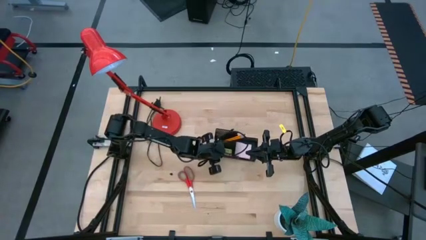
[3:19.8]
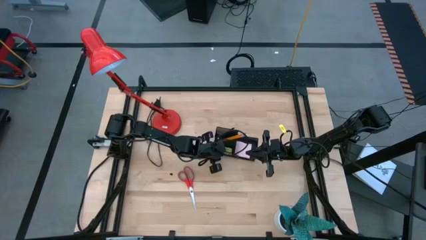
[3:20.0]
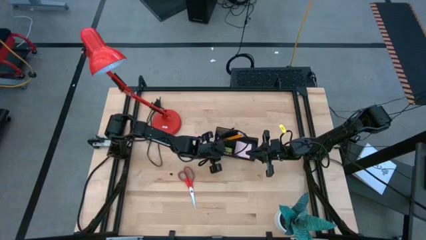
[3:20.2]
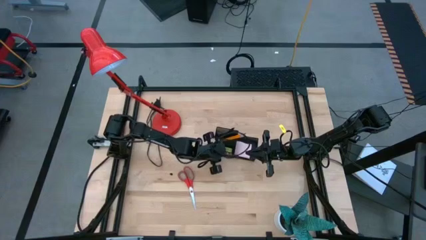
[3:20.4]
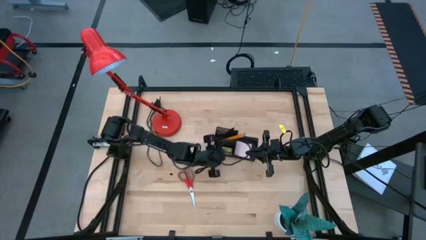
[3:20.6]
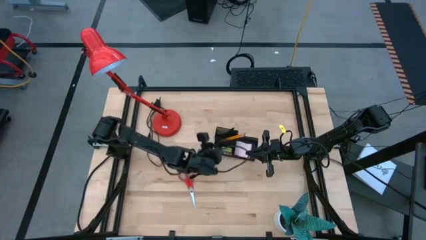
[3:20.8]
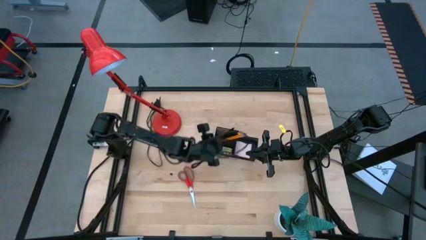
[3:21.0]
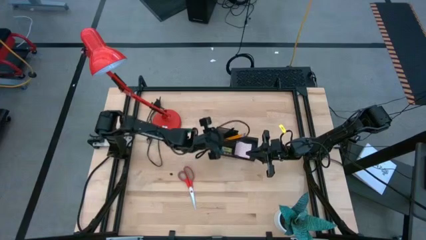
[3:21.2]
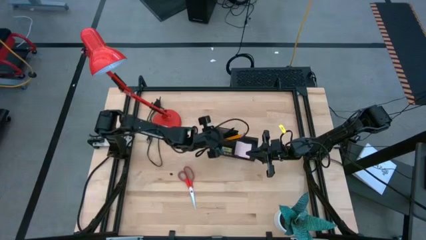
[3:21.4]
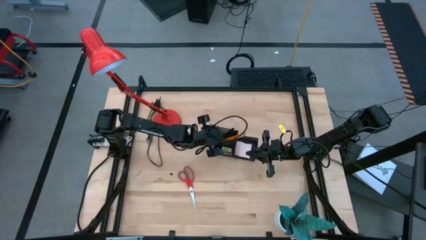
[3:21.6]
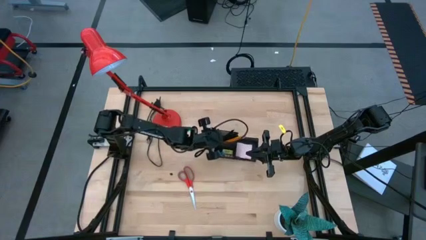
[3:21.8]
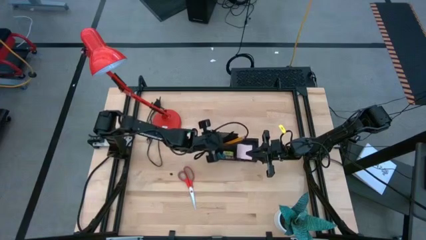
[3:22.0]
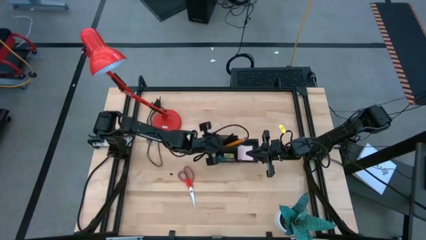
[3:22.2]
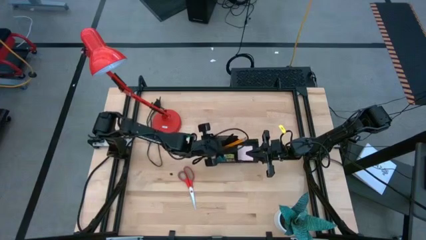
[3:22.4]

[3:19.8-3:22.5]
Task: Pick and place office supplies into organizer
Adjust the black desk organizer

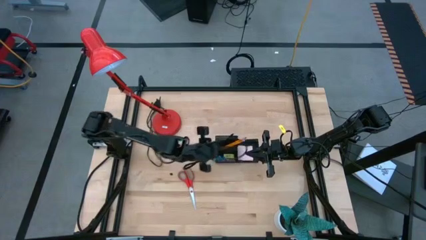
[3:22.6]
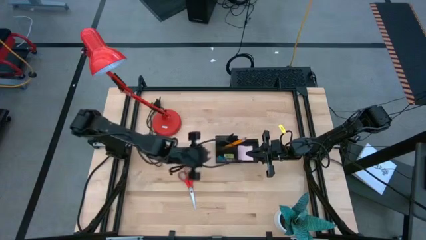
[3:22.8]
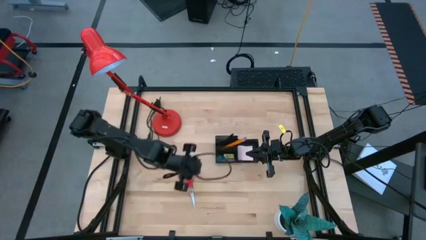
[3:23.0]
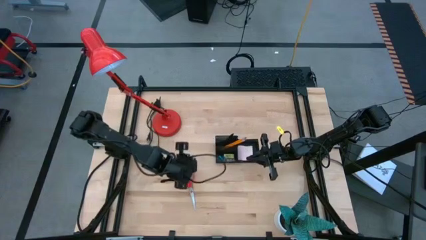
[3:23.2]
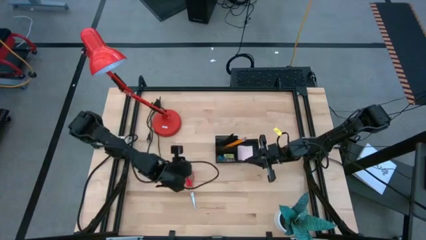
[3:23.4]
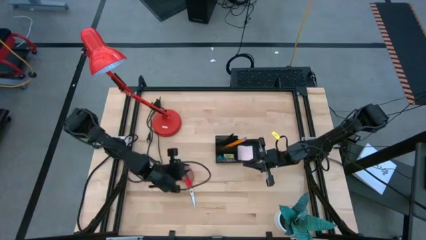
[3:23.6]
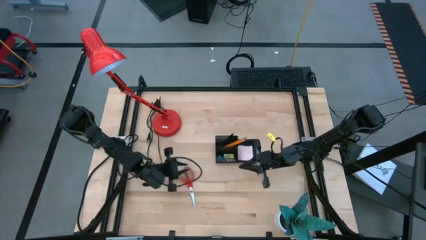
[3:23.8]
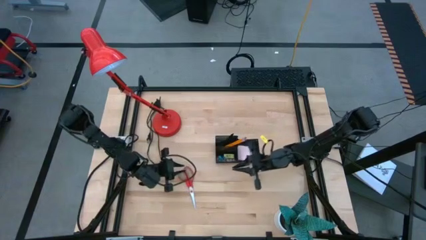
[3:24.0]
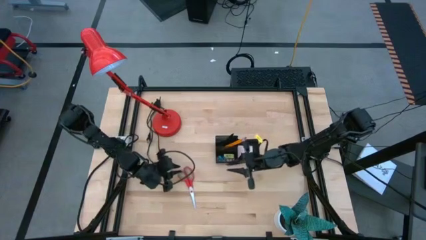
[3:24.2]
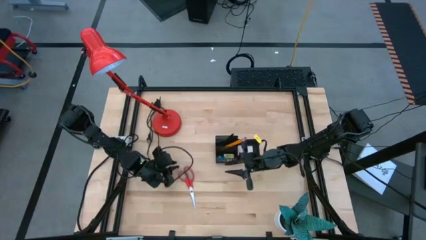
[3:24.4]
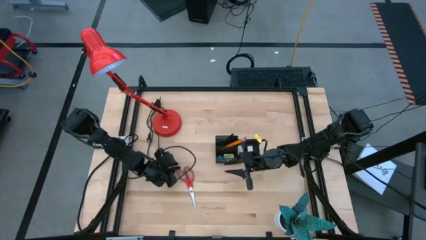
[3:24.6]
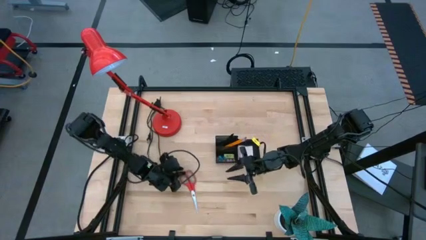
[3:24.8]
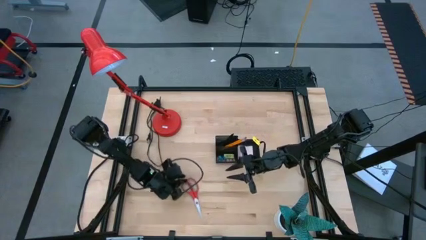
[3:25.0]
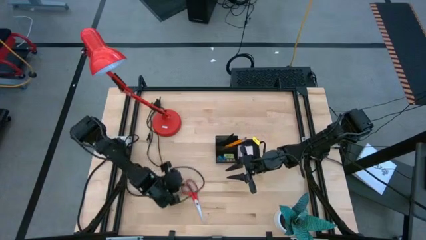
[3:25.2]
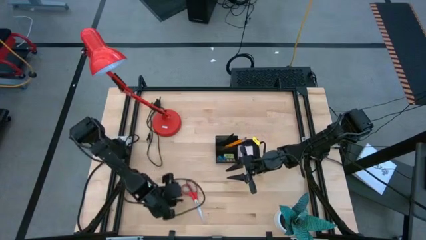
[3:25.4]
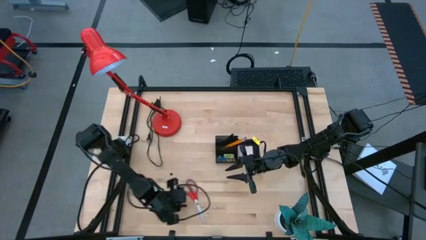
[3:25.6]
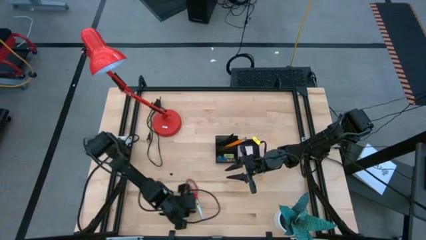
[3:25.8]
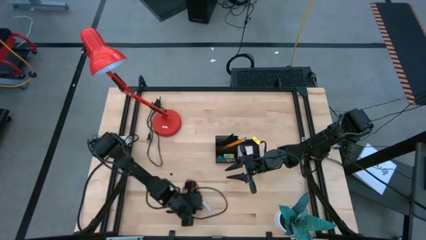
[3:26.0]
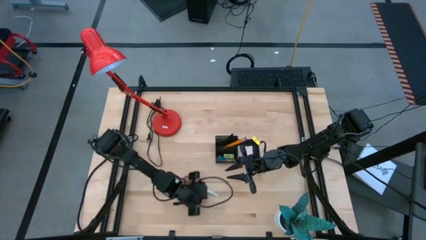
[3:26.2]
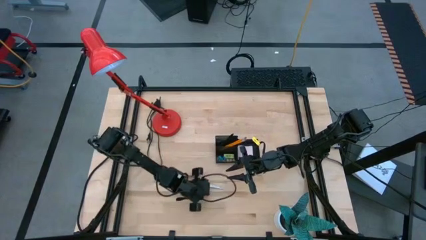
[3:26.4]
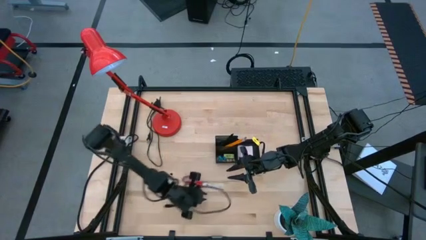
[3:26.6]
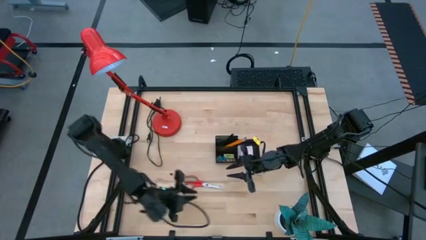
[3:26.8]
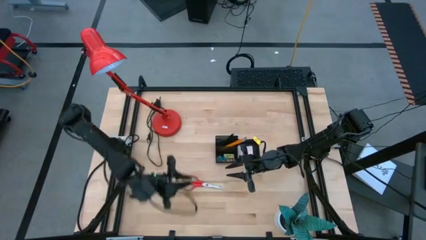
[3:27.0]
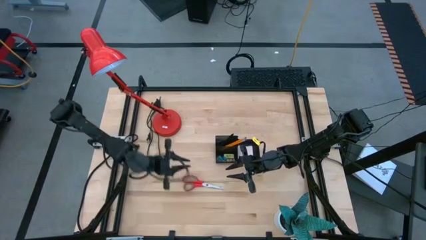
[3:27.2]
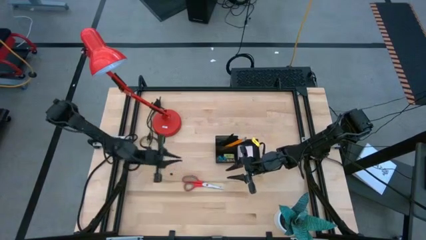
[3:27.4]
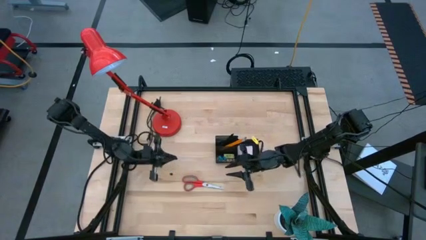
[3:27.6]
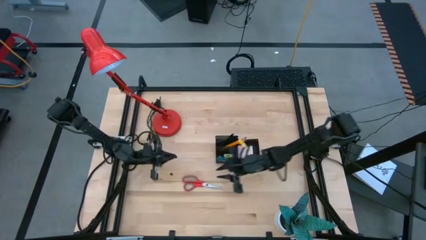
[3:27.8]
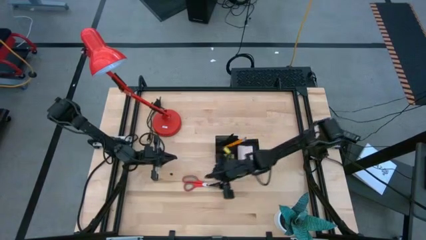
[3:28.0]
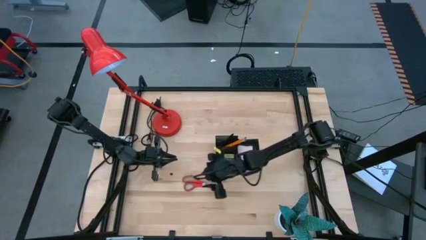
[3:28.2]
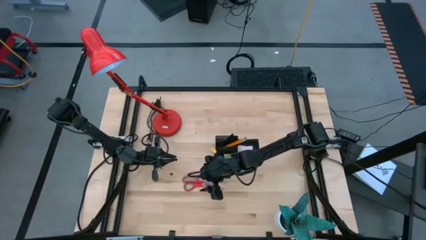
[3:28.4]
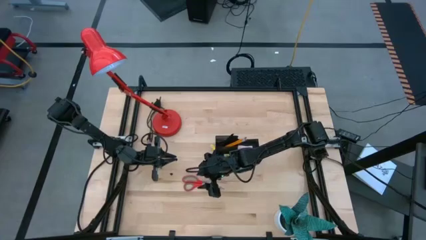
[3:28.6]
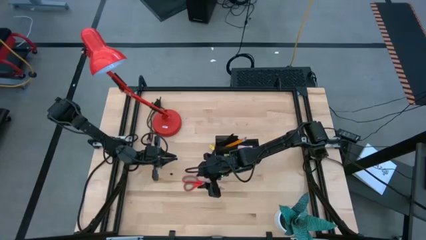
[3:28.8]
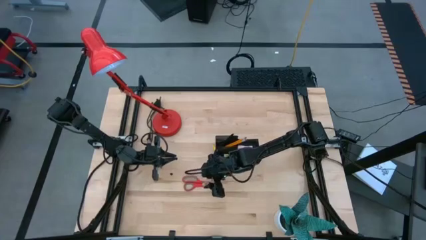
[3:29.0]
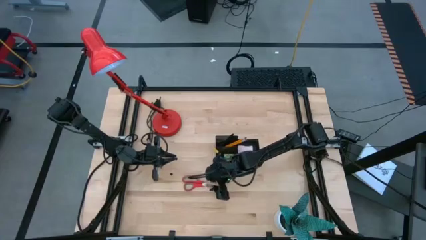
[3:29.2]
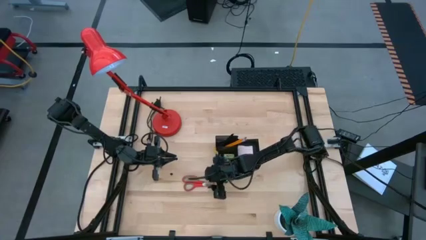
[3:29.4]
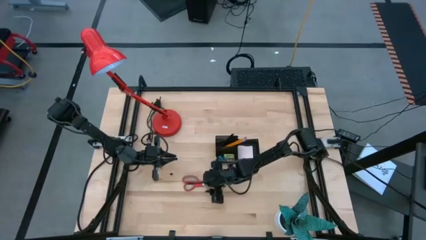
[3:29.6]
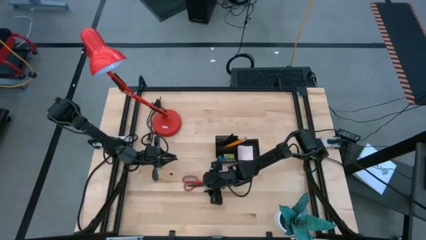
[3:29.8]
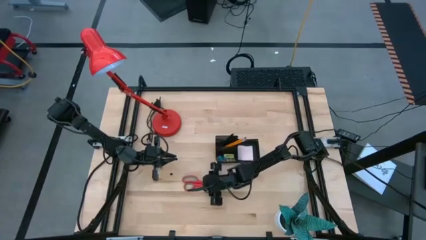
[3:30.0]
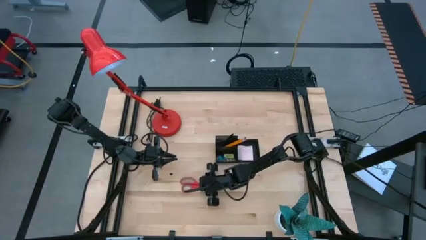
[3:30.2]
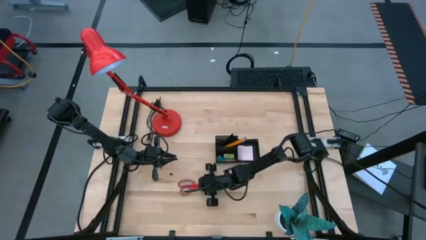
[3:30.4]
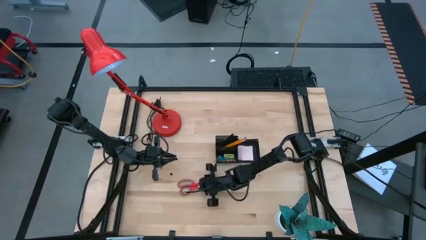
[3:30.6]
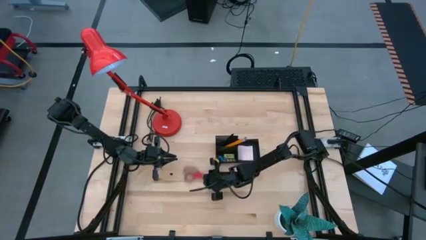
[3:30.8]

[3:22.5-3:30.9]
Put the red scissors into the black desk organizer

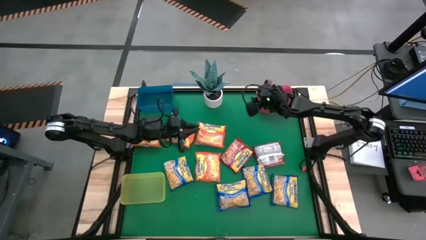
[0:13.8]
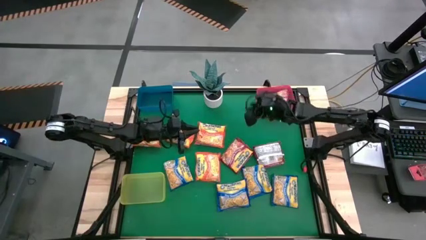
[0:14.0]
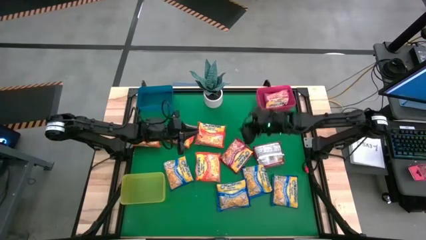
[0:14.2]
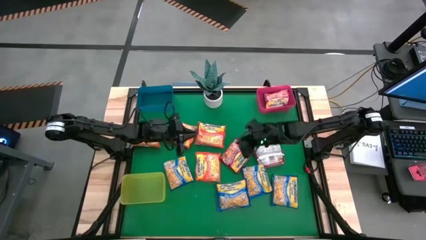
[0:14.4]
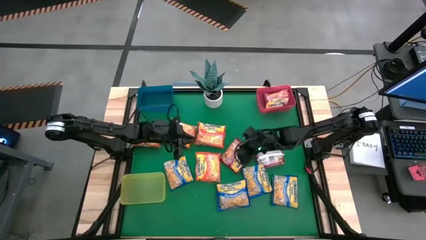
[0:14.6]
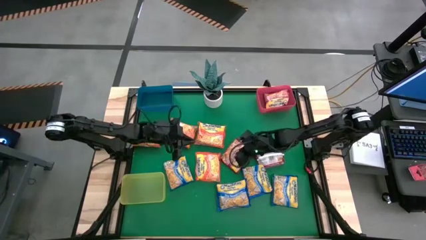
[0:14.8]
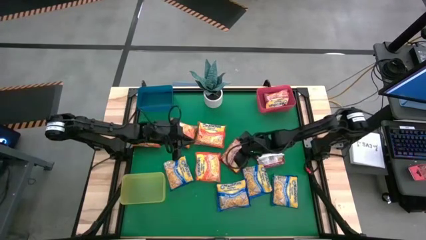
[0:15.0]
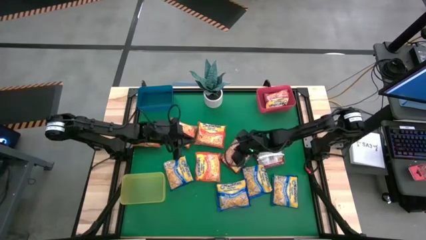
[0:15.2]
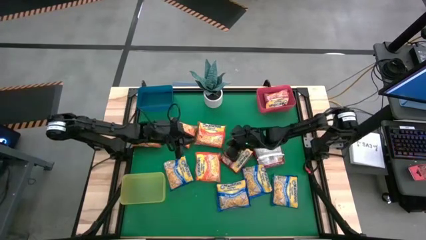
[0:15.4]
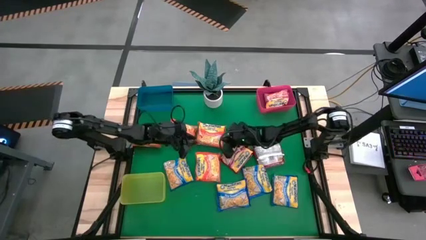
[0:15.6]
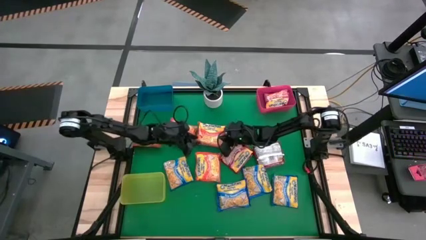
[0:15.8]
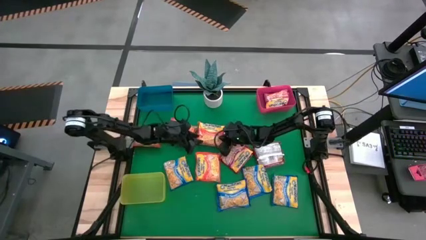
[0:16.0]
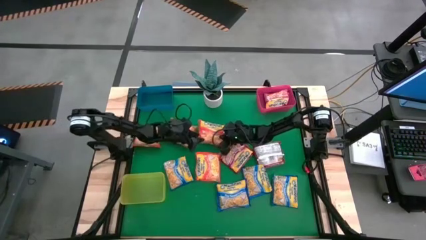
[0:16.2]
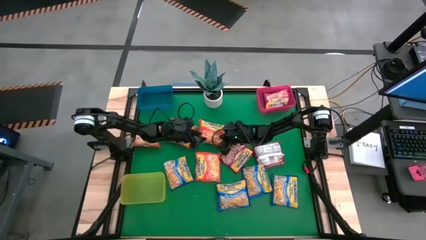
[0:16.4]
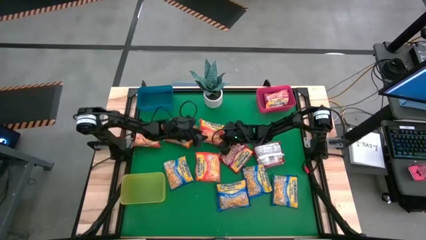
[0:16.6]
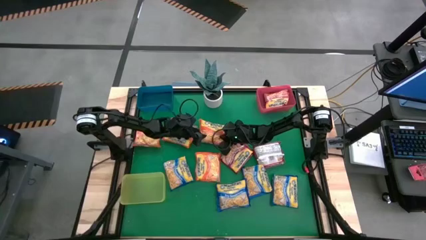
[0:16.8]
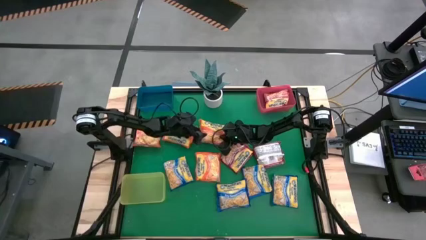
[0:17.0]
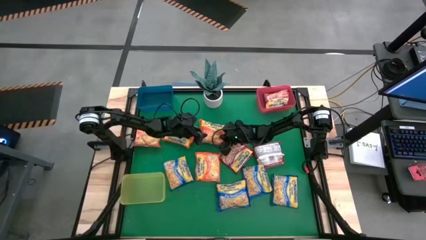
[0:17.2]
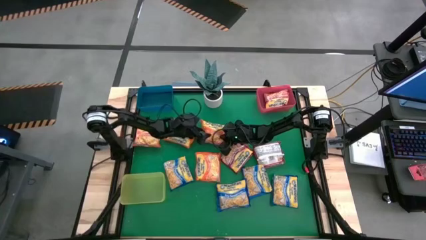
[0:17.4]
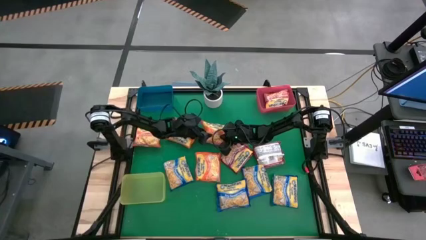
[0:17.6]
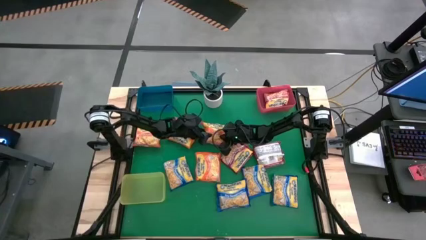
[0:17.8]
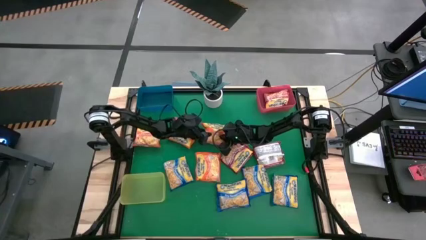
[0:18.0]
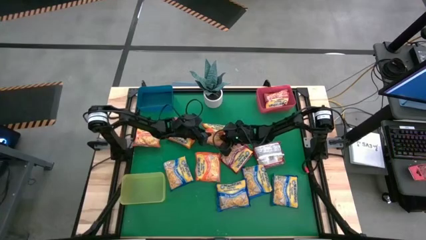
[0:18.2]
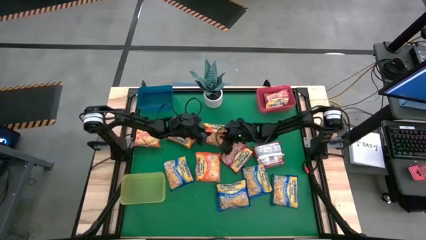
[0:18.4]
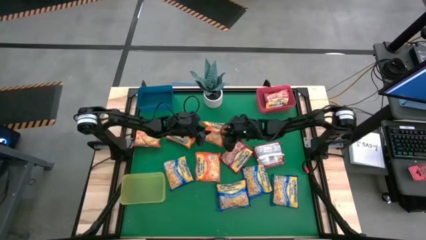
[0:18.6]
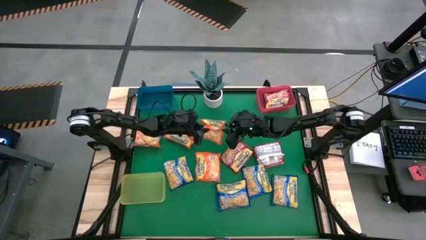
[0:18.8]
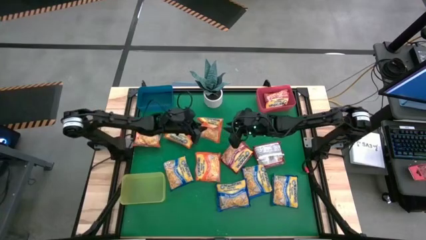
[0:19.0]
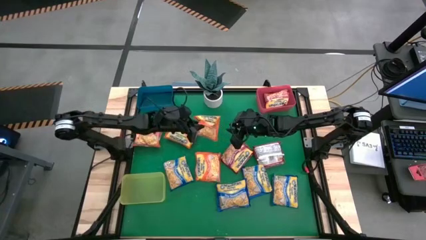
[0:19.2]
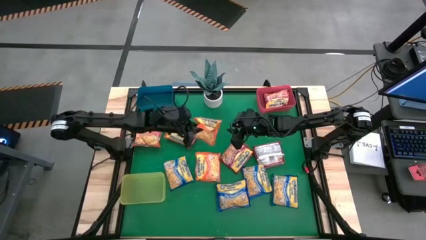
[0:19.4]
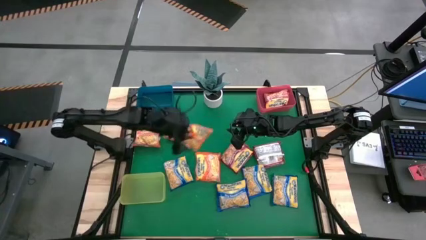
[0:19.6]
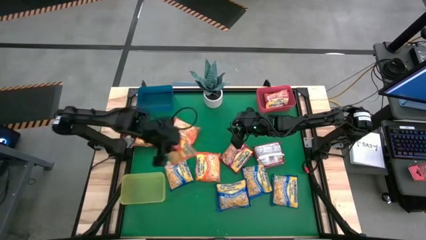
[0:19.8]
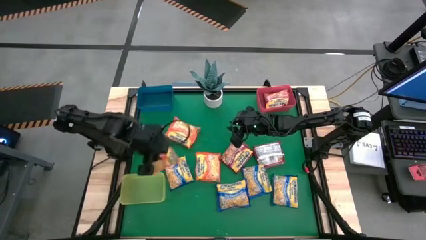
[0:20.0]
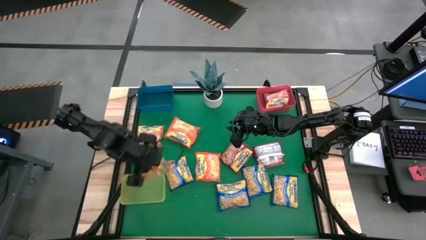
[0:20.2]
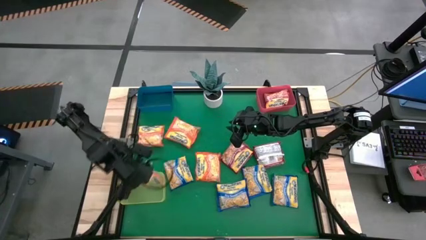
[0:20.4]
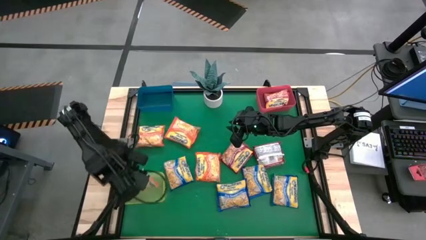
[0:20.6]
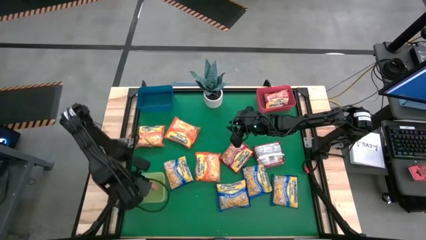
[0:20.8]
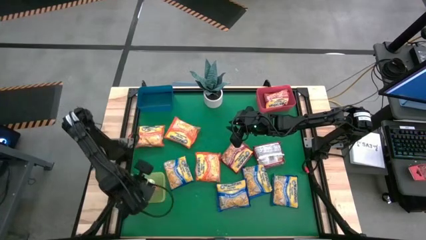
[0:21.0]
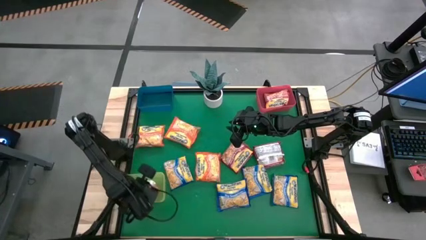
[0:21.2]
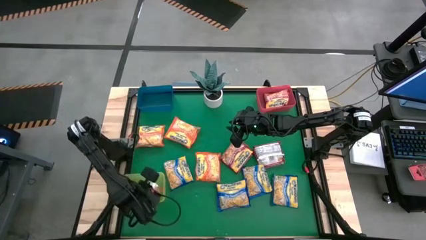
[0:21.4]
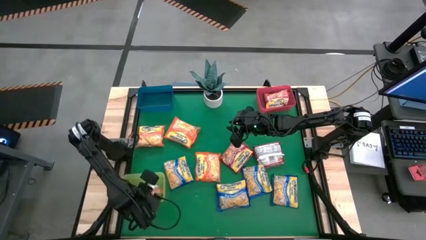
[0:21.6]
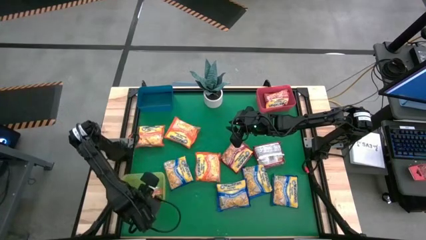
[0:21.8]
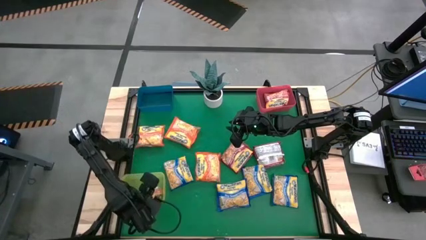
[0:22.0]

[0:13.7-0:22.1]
Task: Sort Maruchan noodles
Put the orange noodle pack into the yellow bin
